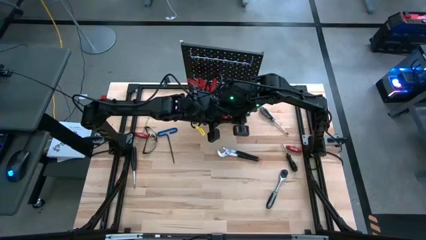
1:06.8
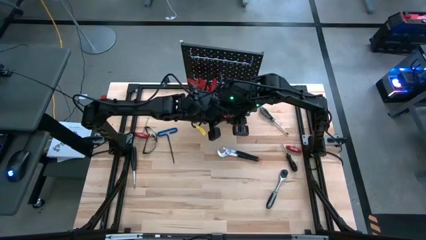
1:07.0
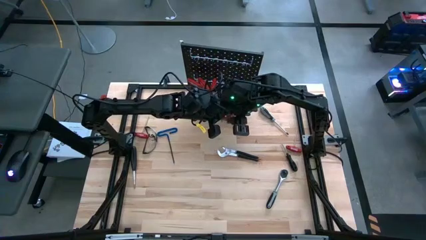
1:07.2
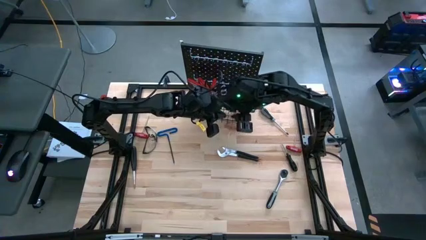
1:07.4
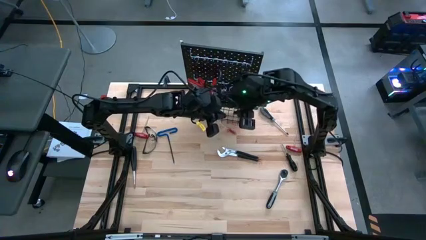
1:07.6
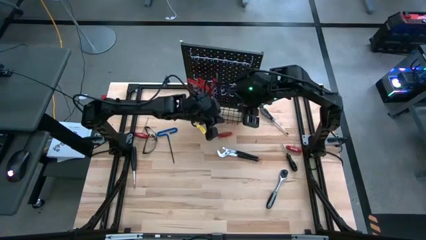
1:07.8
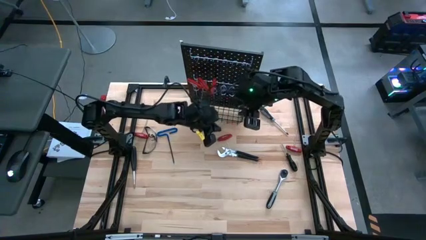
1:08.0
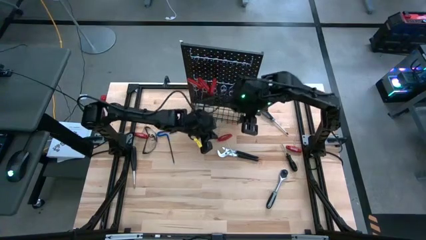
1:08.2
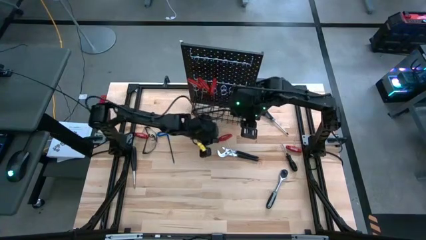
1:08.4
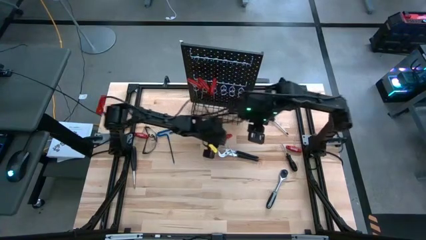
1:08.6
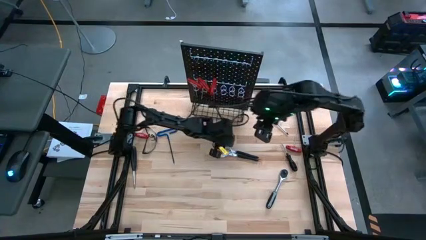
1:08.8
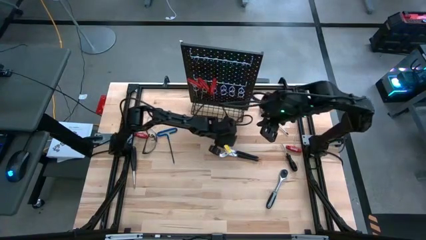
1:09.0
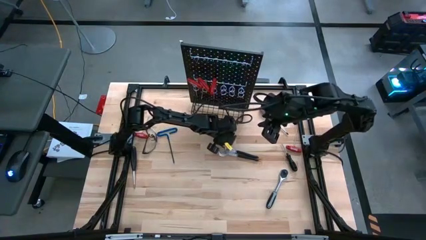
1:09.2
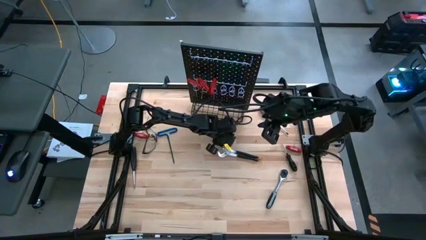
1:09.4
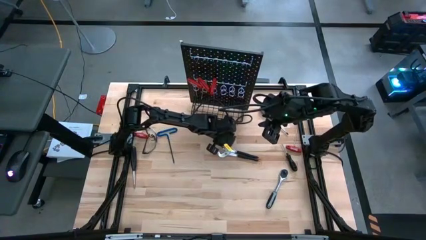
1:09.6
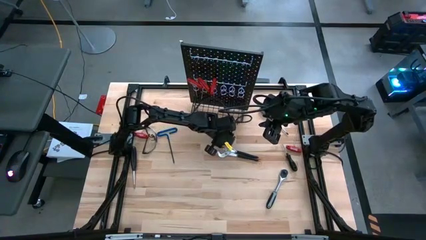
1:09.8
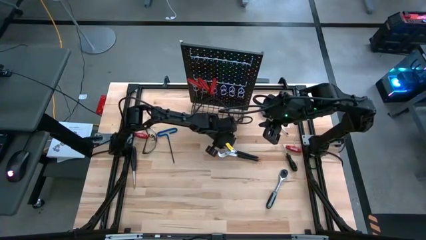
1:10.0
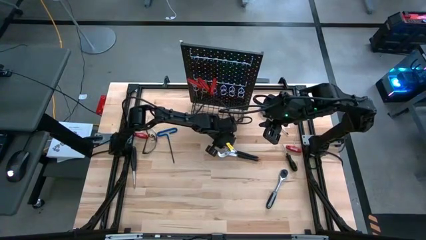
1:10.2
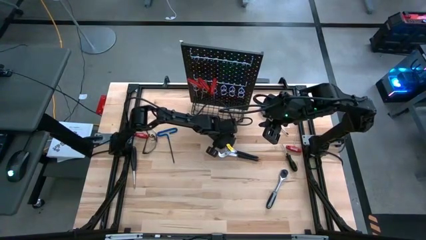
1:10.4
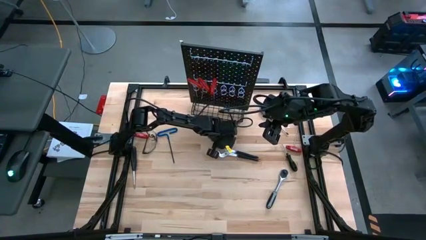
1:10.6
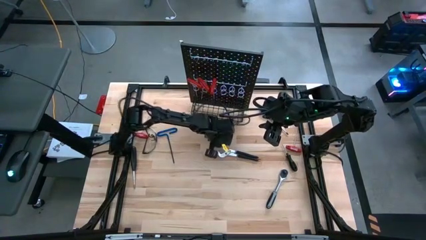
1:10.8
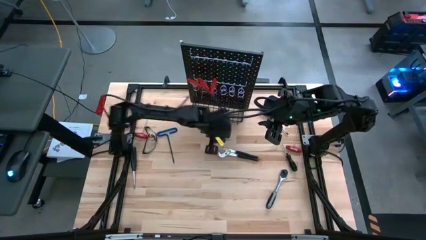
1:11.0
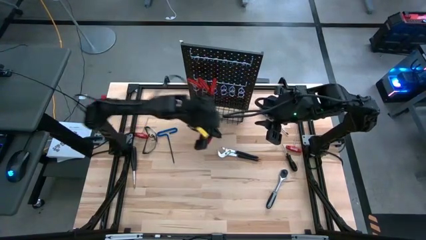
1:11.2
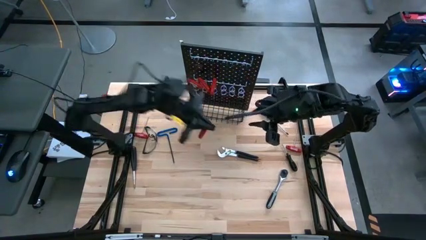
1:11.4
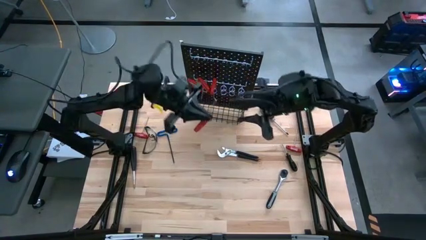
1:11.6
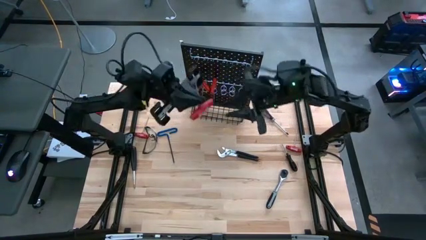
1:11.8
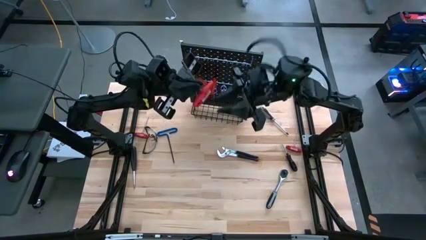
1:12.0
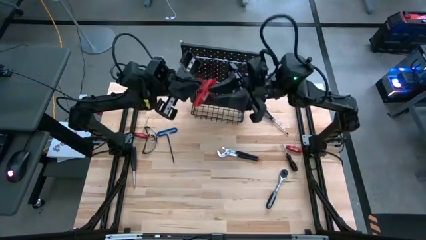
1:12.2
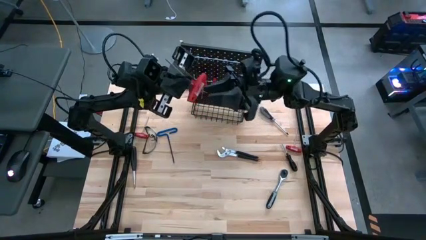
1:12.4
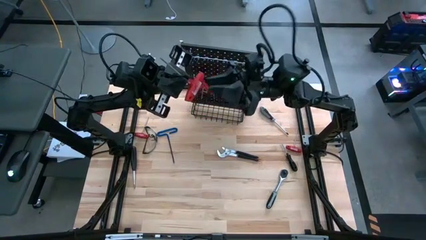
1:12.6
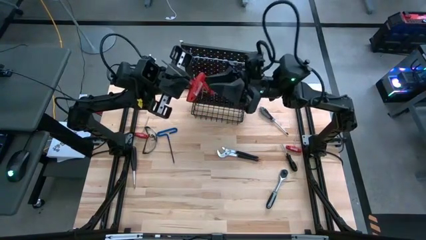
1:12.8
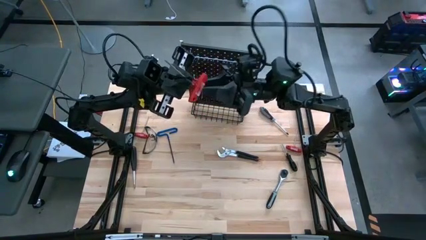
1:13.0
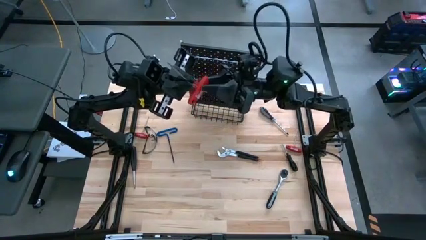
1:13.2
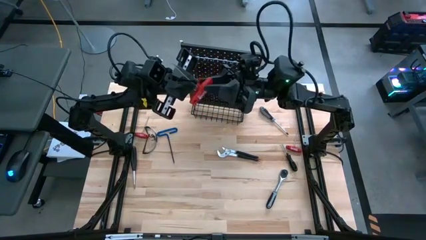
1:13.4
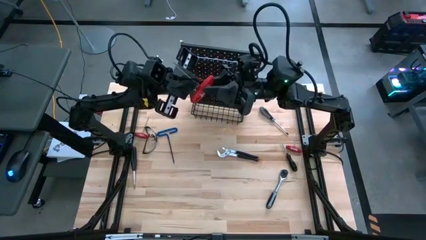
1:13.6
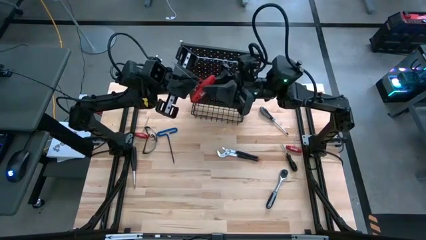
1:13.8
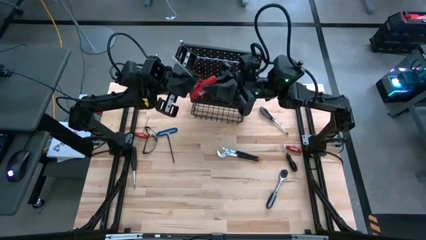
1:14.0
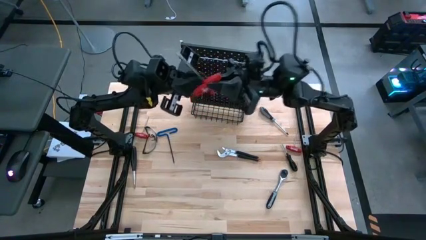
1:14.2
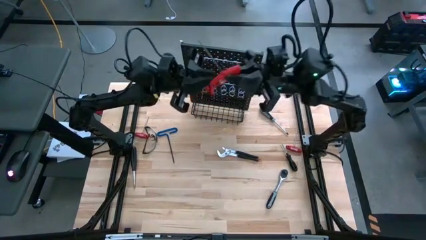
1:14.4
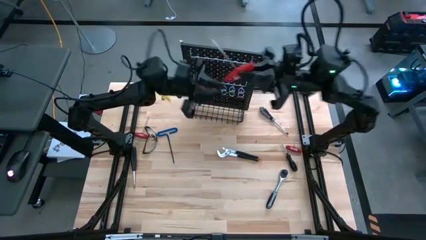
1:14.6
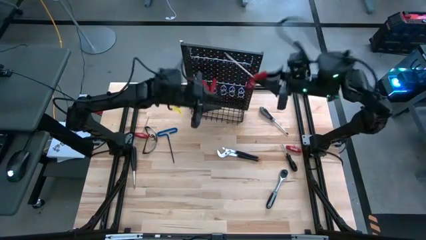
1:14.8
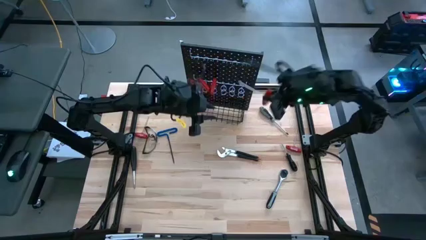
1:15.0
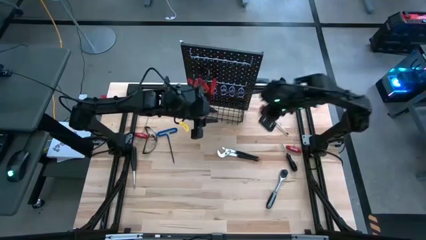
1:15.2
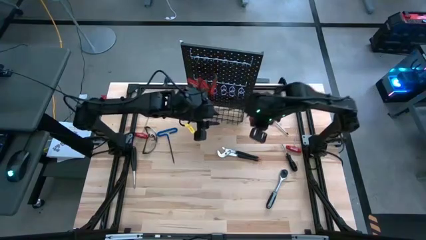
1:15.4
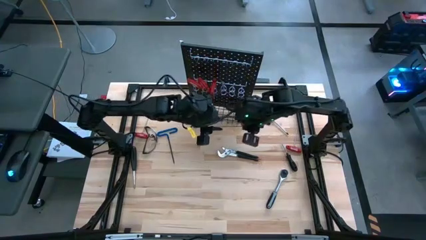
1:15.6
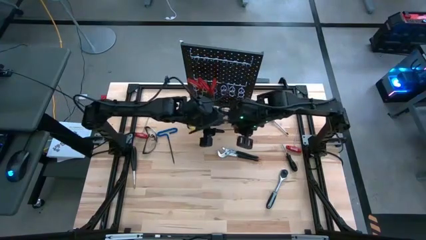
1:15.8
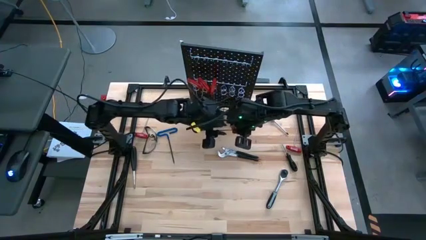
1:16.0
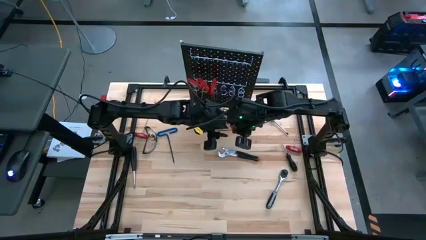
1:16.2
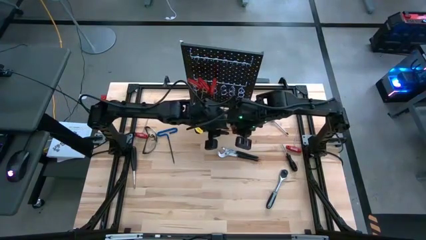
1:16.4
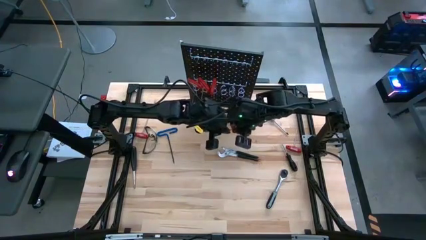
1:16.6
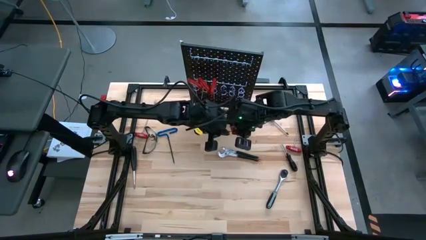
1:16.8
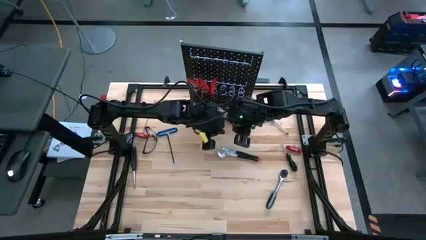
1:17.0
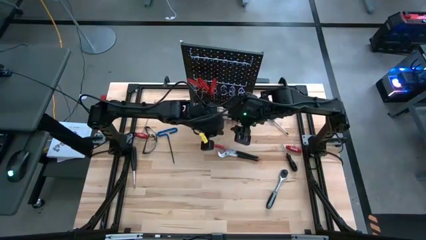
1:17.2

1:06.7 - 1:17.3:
Task: Hang tools onto peg board
Hang the top red allen wrench on the pegboard

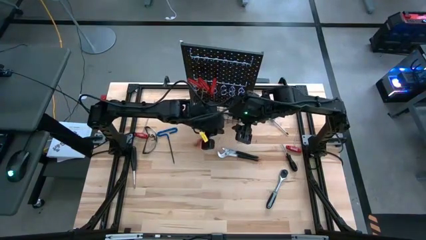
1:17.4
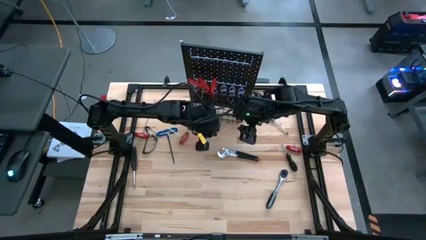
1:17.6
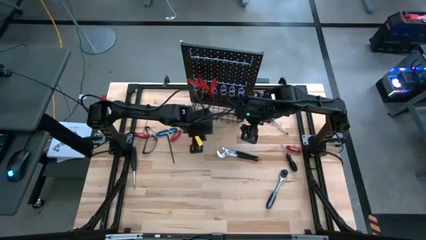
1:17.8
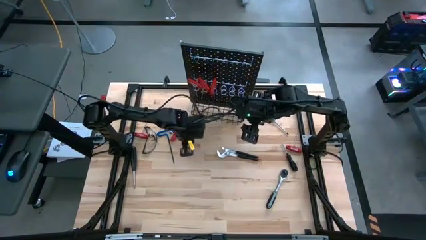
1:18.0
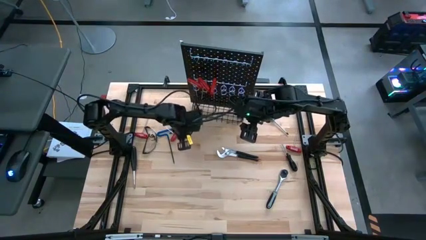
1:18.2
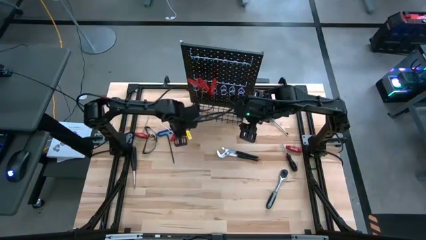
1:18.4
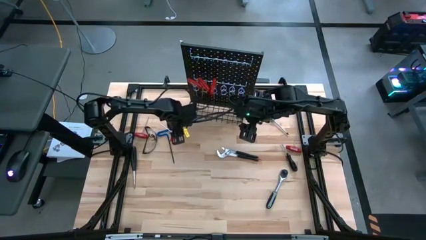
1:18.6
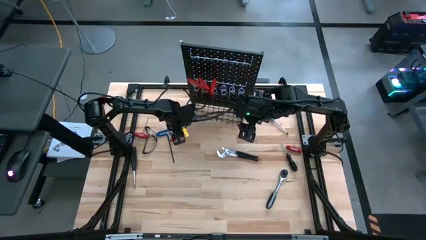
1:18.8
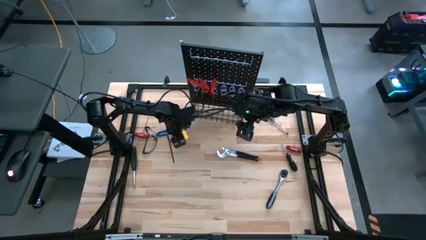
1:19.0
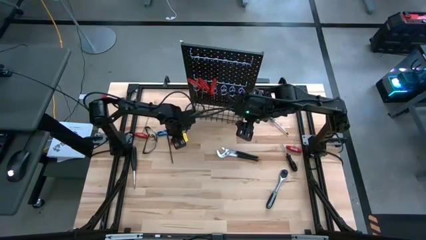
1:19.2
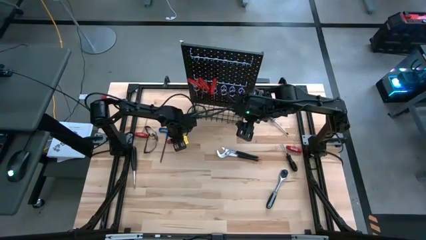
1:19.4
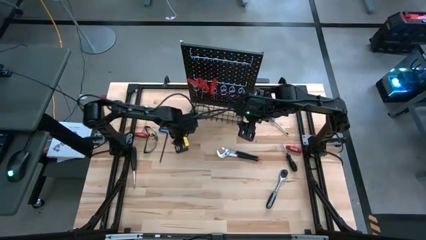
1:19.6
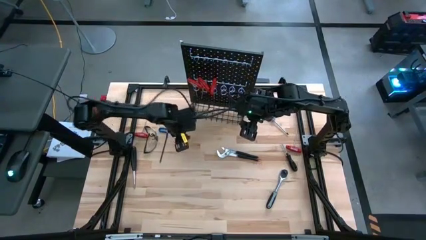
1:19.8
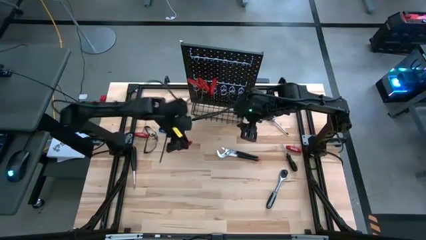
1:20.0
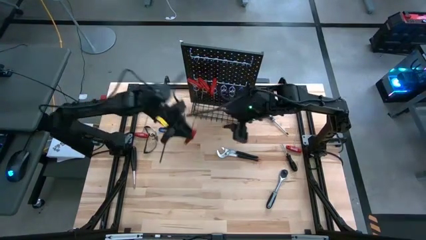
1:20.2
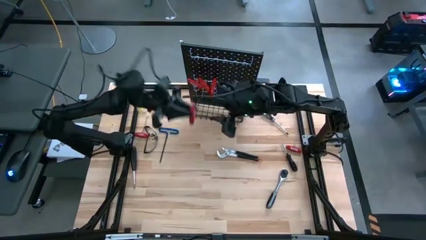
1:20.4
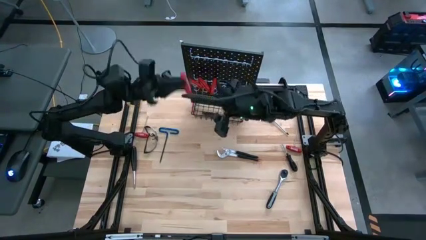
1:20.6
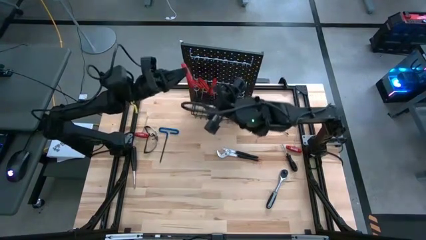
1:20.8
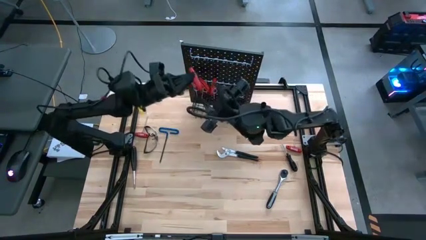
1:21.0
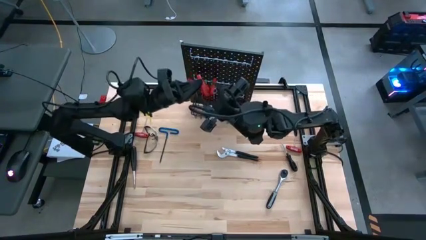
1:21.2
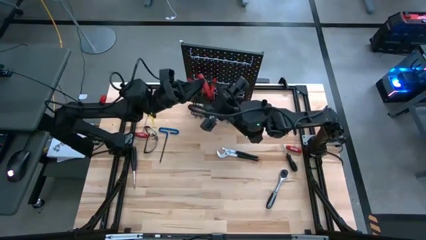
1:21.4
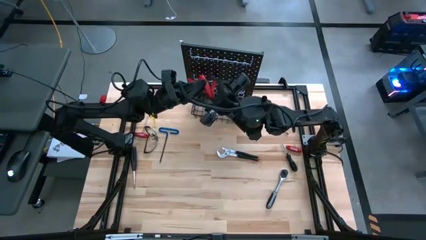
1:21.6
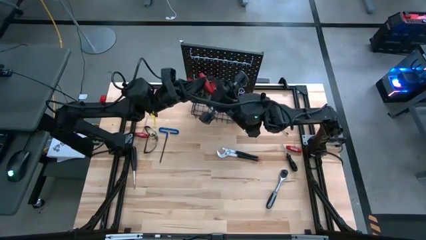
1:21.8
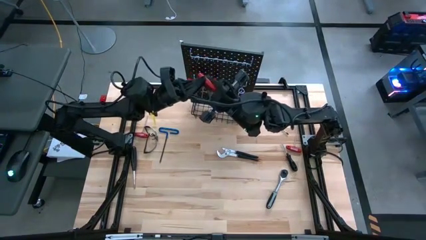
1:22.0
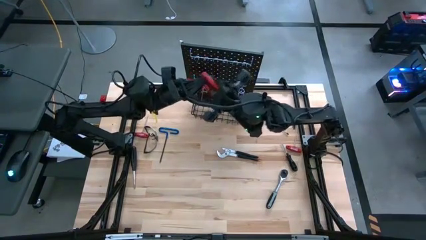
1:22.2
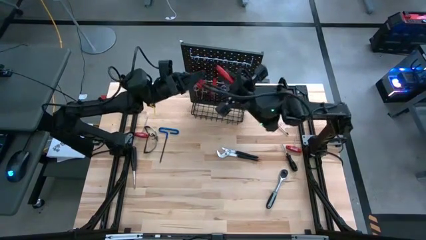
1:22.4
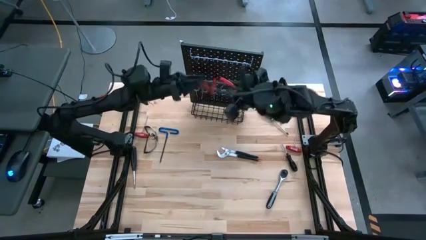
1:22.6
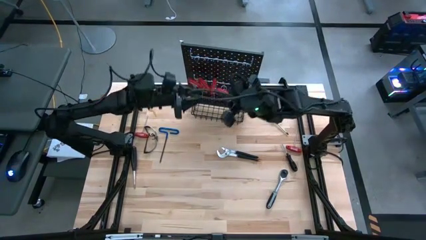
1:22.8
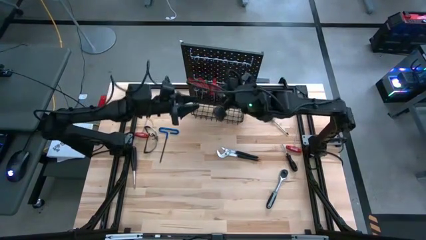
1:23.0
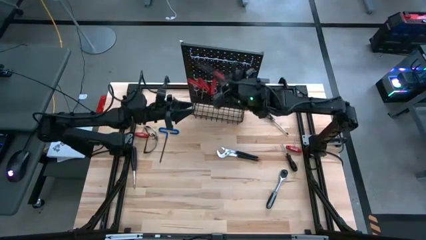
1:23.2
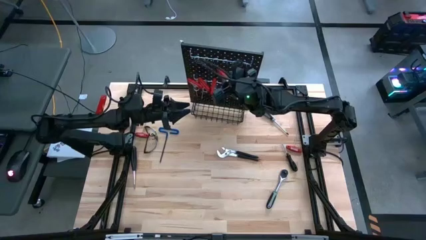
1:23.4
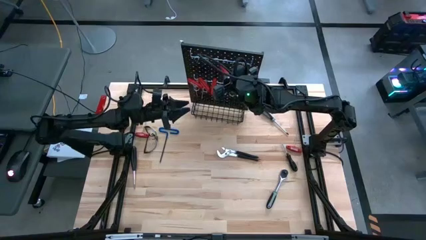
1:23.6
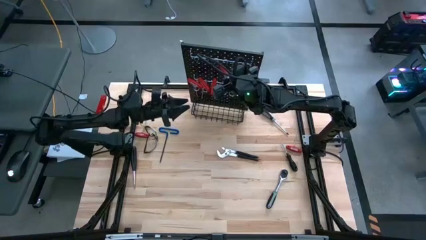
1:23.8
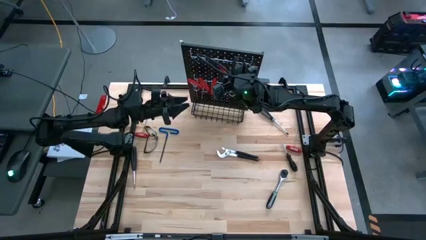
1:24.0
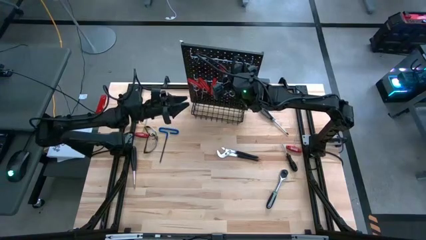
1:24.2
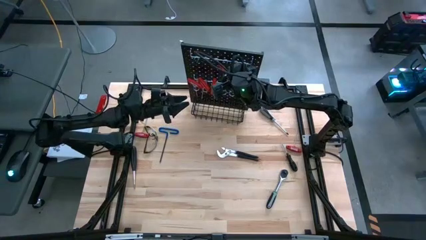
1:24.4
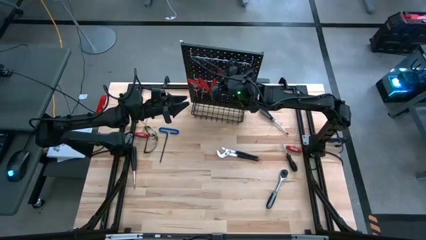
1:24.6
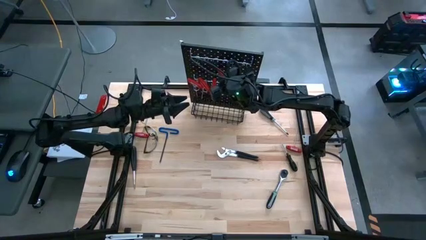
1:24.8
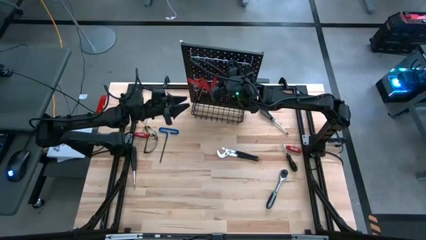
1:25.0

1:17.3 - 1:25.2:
Hang the center red allen wrench on the pegboard
